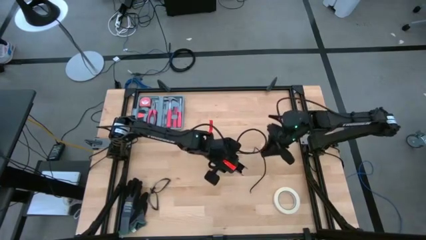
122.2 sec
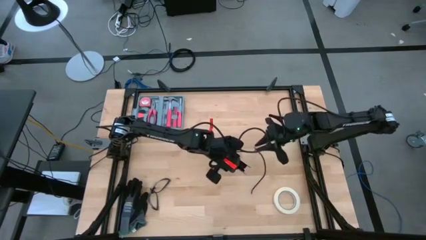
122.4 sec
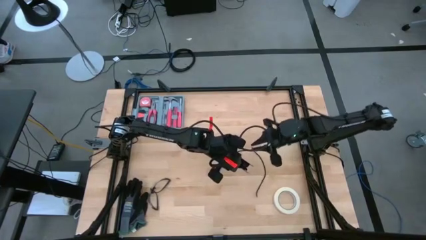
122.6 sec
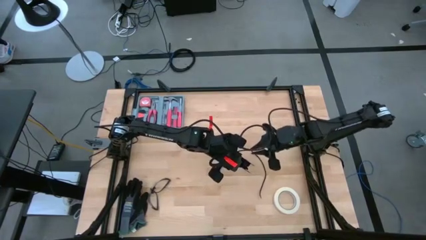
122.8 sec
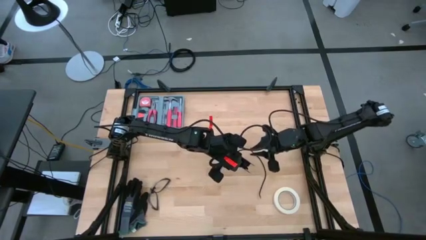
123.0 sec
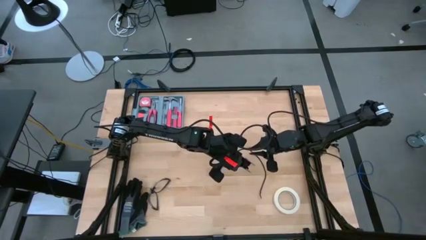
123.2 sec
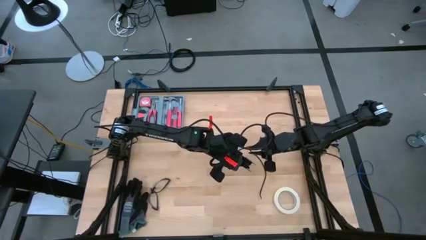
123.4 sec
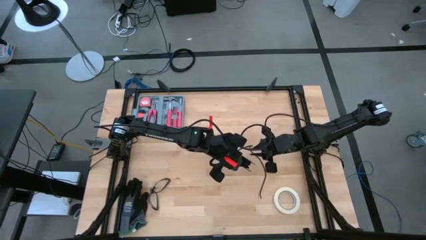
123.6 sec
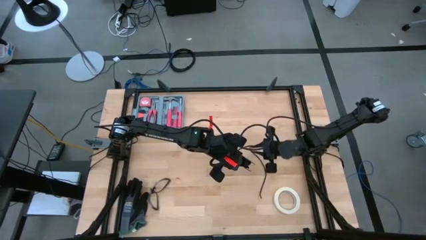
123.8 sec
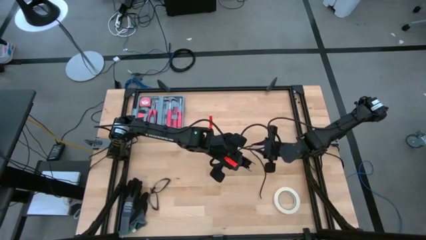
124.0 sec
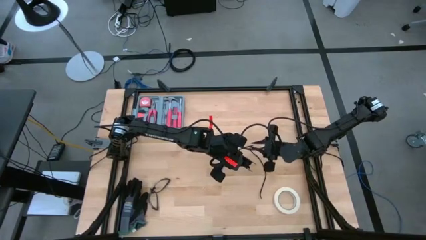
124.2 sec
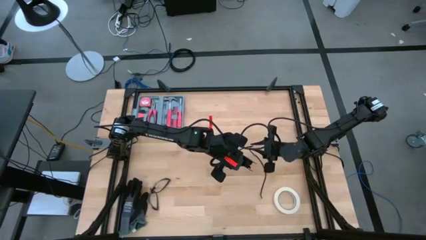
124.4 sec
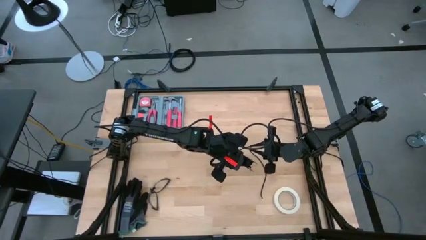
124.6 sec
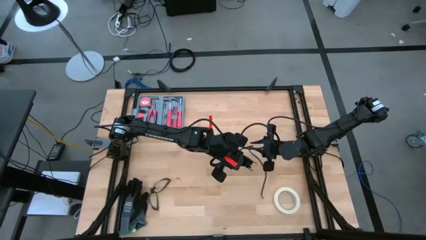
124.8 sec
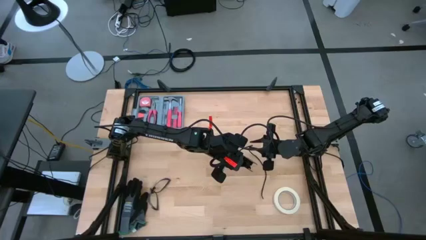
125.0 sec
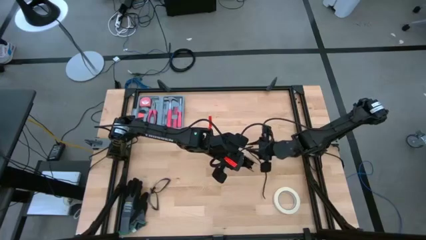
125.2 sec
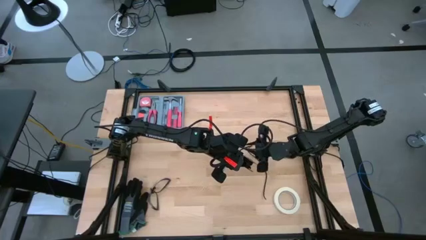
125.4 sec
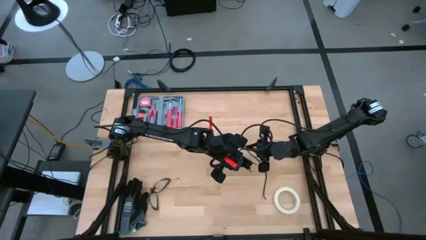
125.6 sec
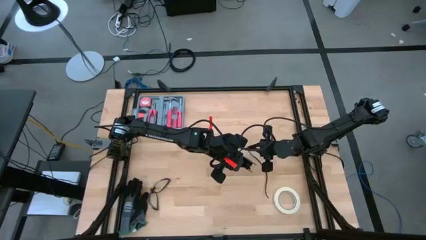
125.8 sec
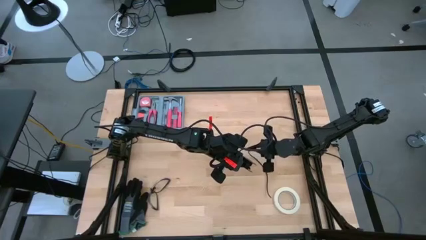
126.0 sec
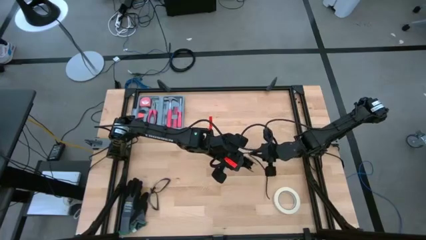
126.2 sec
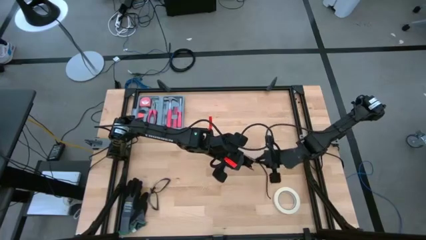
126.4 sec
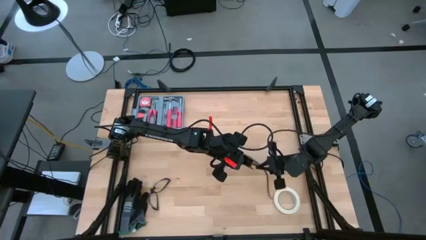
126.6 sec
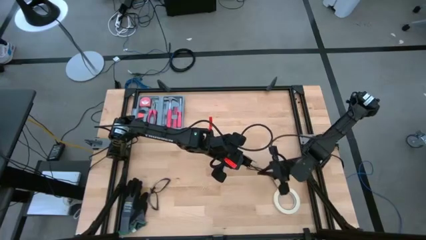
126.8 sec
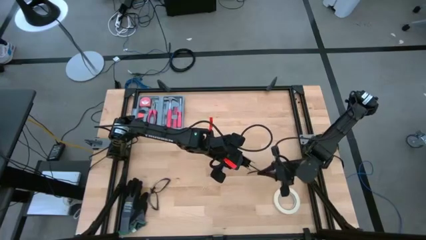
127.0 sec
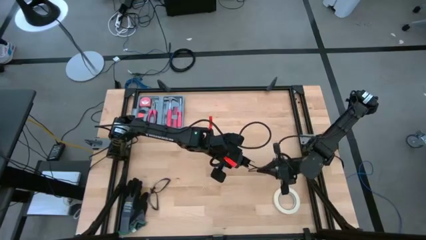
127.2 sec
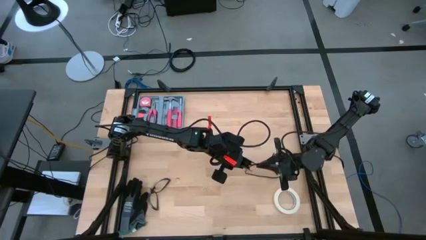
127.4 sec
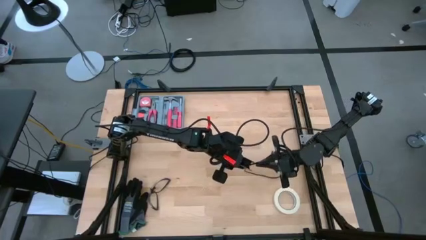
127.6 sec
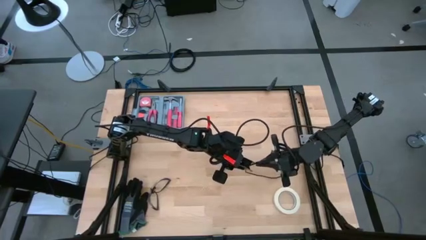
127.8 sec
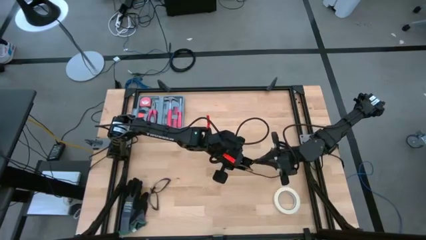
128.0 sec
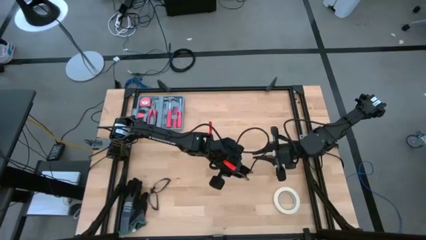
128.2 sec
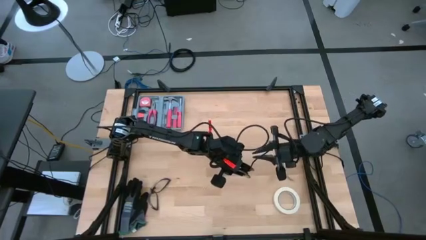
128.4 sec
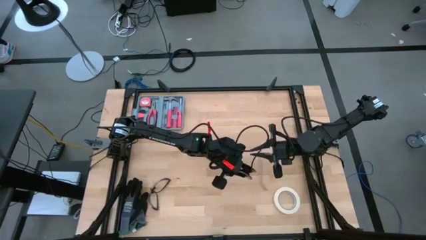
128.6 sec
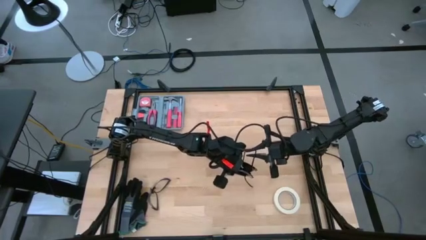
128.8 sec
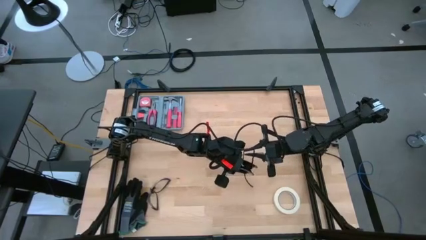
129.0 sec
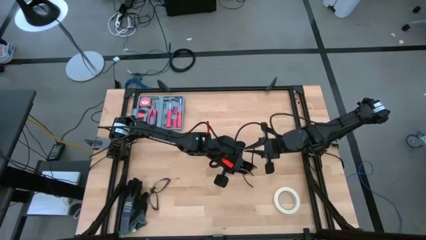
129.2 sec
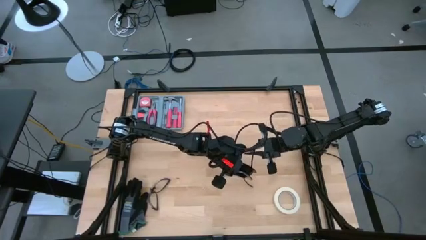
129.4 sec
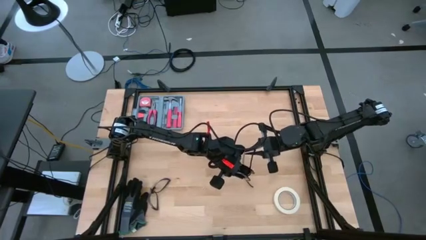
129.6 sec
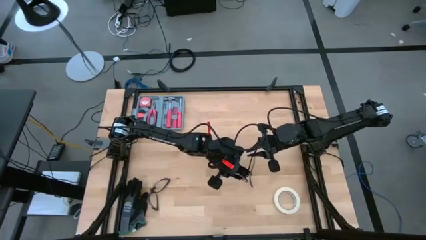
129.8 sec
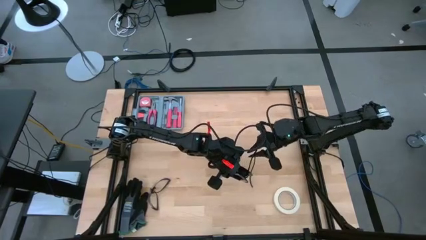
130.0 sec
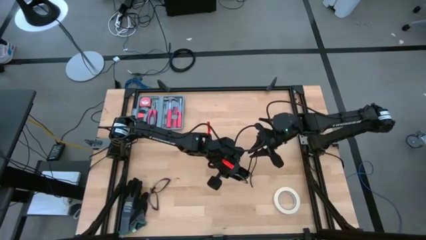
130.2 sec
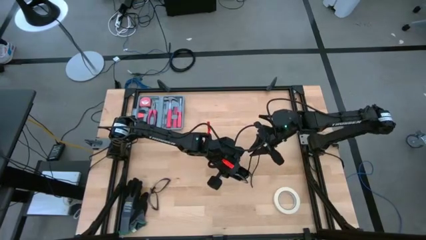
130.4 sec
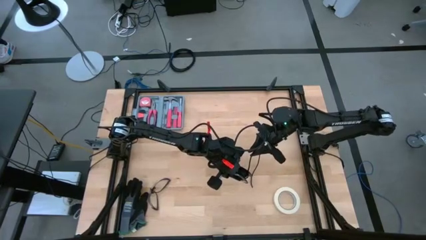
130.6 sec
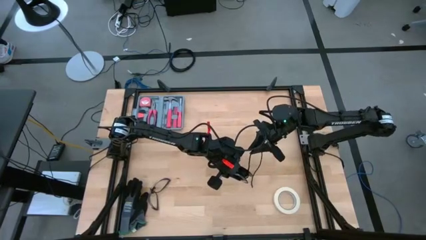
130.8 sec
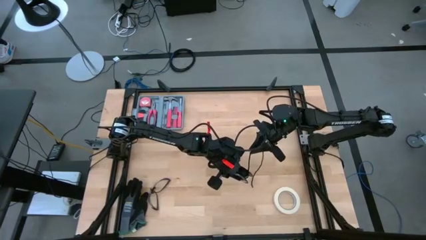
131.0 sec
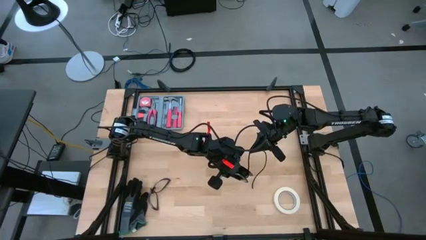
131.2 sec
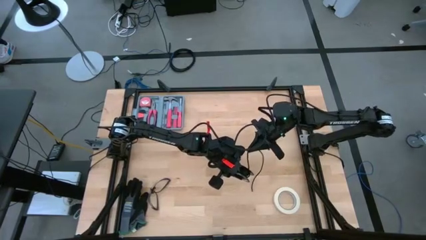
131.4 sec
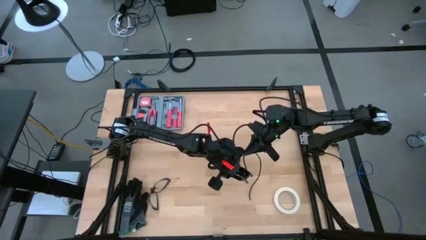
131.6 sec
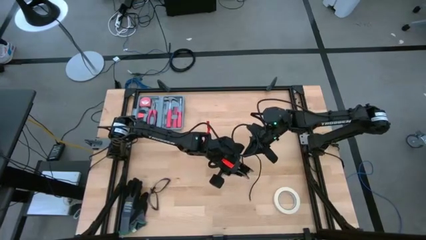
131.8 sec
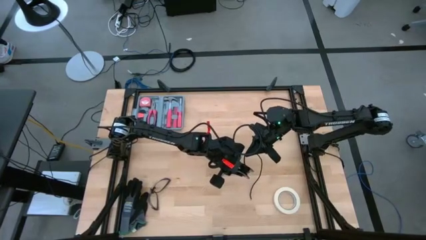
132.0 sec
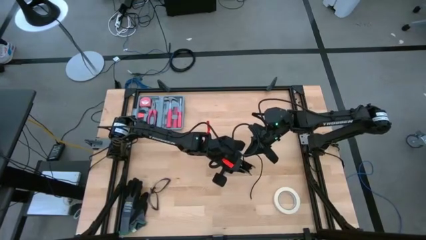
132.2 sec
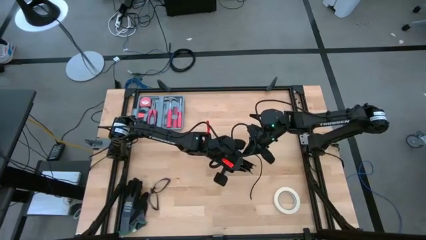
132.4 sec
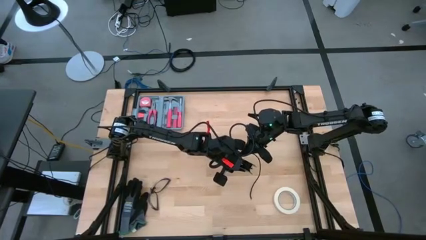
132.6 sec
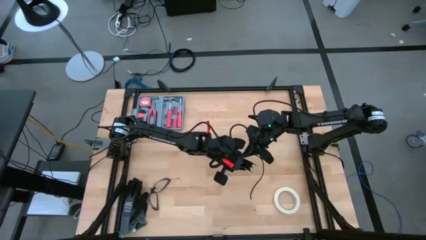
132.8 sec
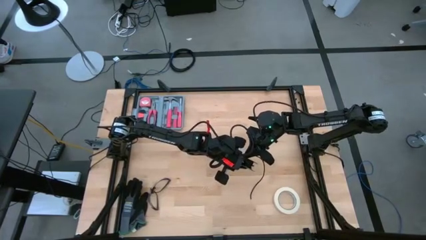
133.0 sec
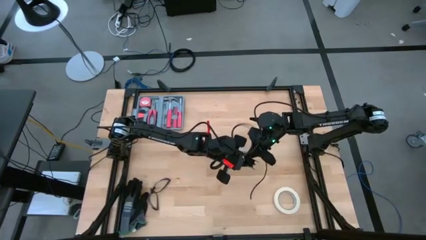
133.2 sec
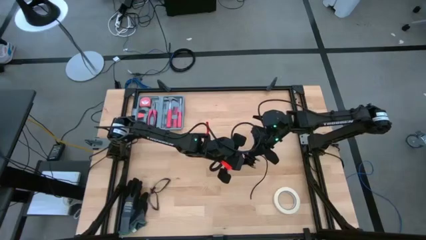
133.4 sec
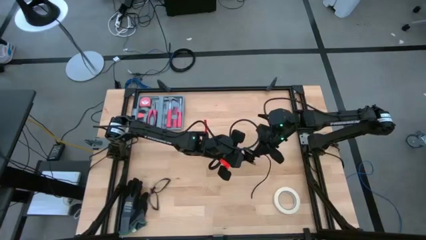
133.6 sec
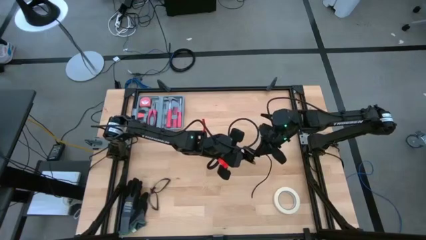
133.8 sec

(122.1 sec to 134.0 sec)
Task: Coil cords
Coil the black wire onto the spool

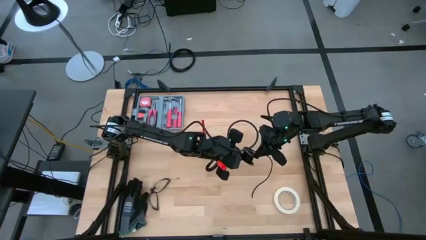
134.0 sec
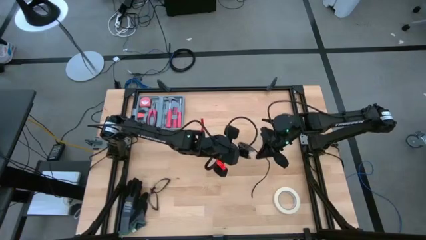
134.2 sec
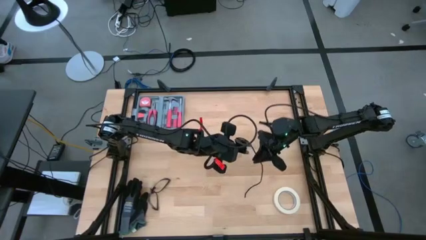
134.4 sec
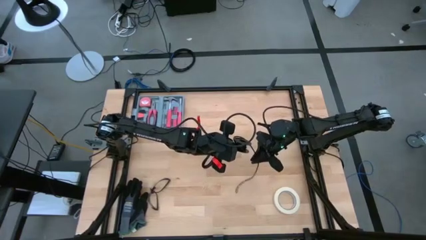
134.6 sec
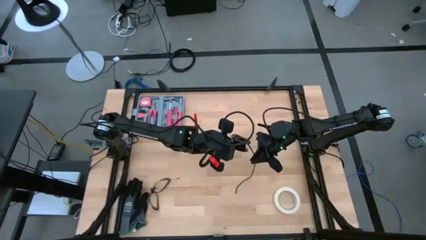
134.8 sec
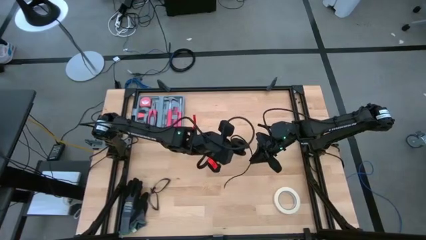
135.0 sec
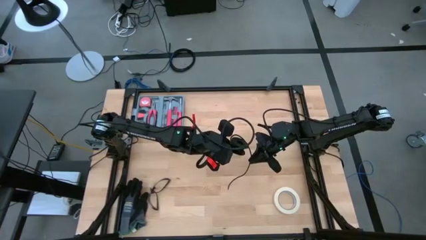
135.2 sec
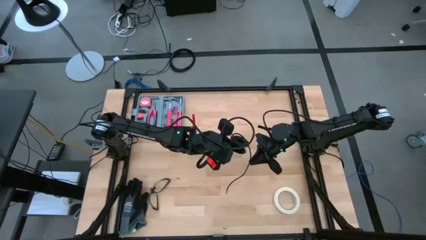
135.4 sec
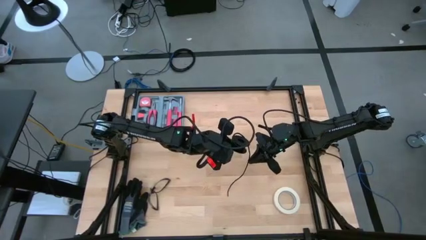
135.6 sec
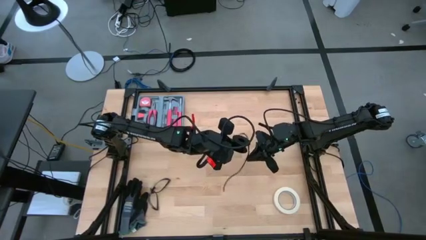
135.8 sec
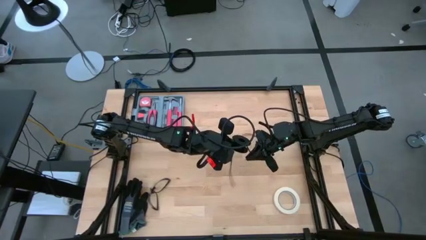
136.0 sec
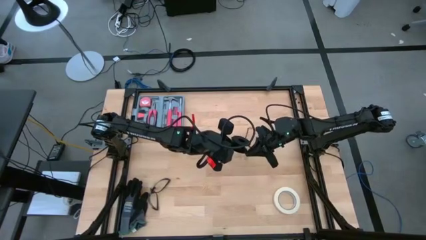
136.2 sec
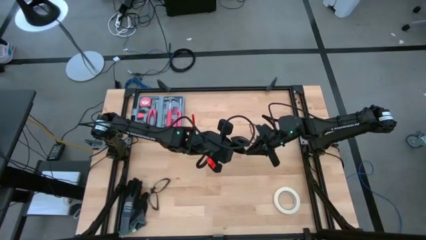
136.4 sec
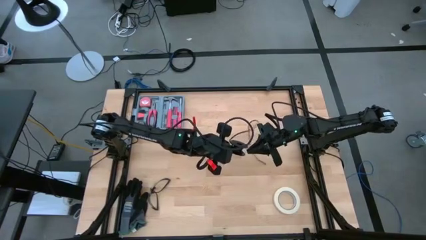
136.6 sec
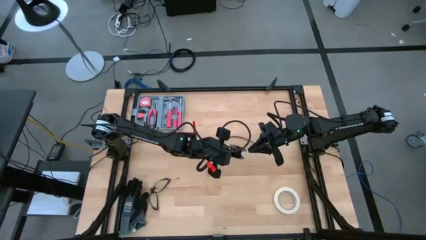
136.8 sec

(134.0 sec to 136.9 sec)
Coil the black wire onto the spool
